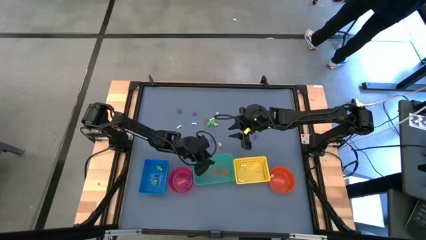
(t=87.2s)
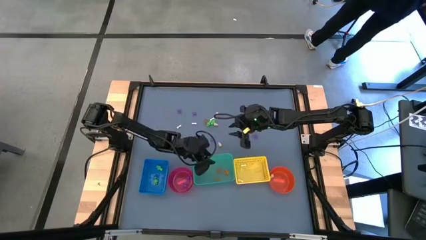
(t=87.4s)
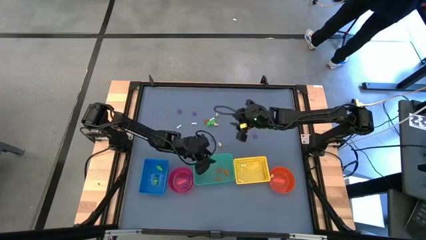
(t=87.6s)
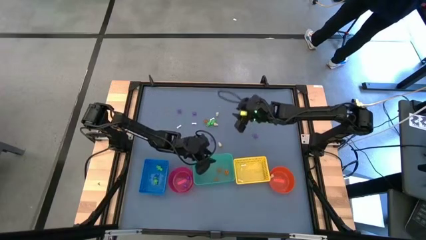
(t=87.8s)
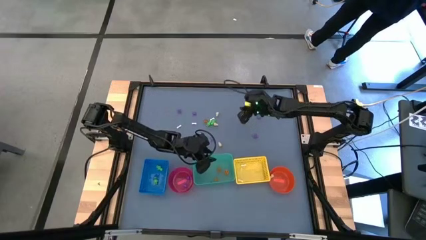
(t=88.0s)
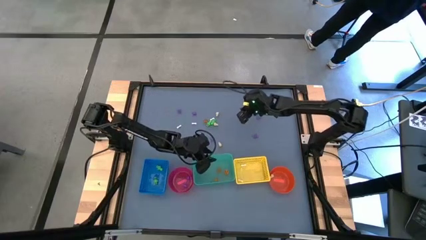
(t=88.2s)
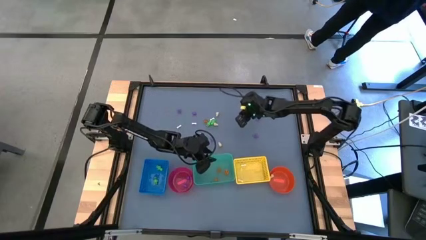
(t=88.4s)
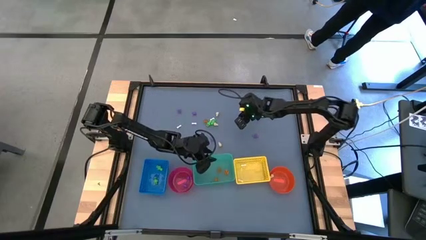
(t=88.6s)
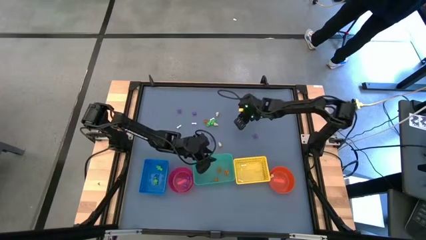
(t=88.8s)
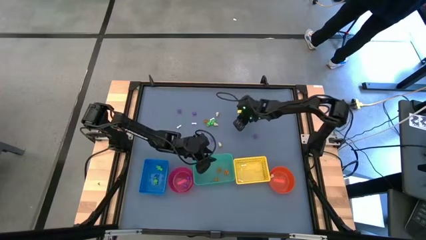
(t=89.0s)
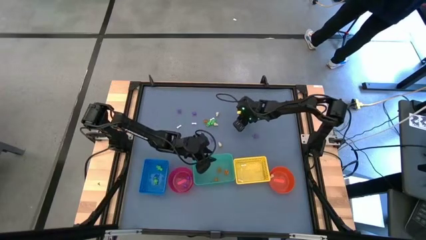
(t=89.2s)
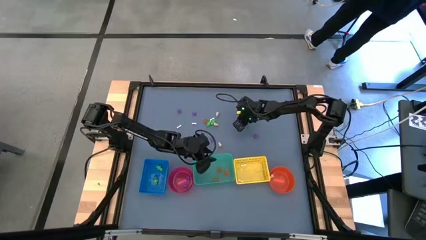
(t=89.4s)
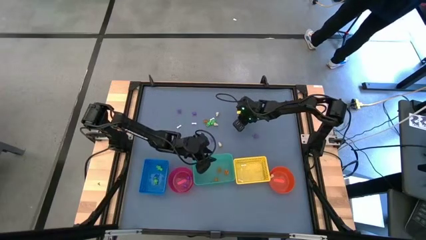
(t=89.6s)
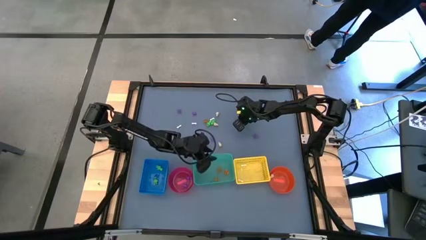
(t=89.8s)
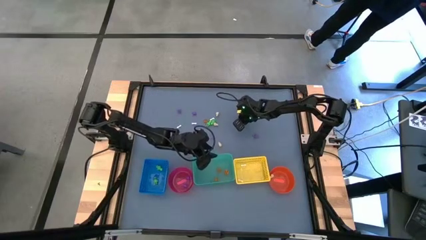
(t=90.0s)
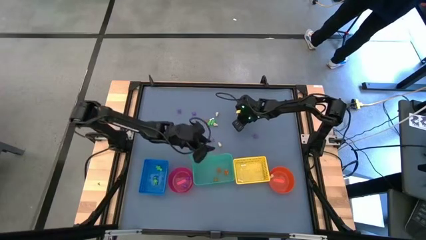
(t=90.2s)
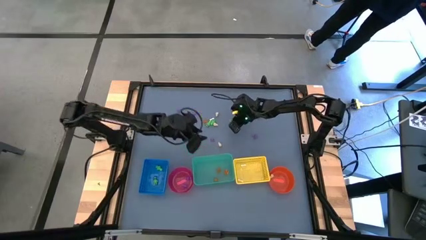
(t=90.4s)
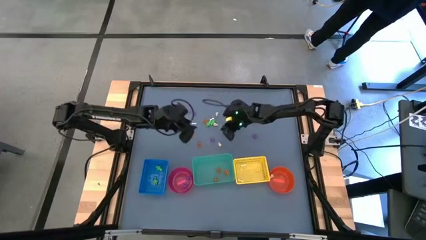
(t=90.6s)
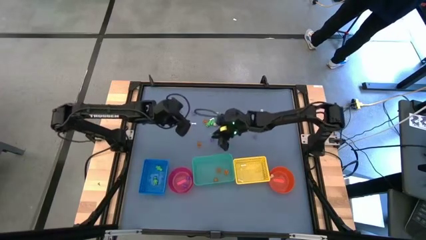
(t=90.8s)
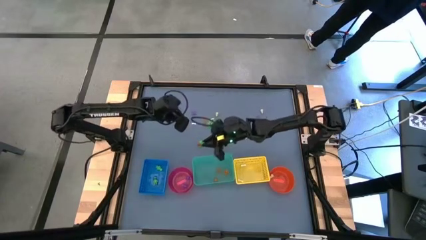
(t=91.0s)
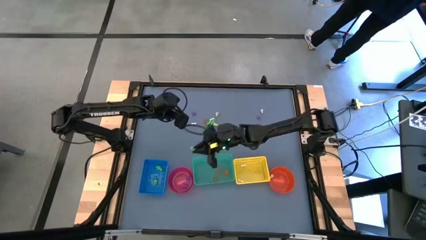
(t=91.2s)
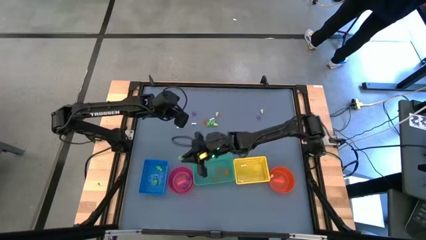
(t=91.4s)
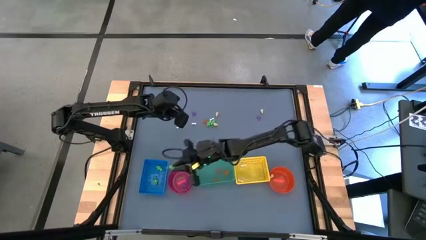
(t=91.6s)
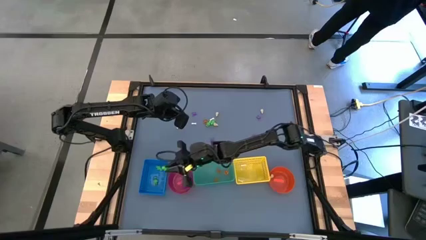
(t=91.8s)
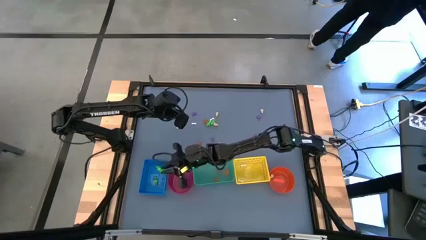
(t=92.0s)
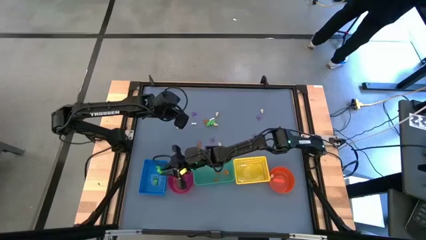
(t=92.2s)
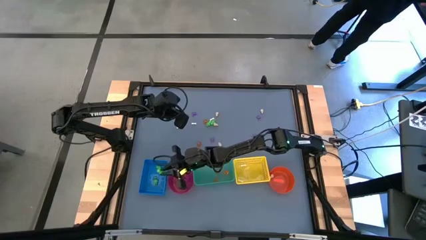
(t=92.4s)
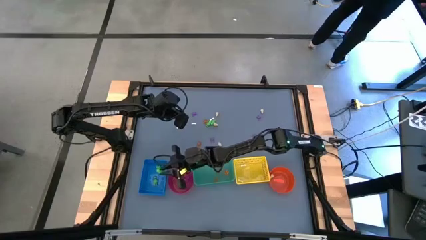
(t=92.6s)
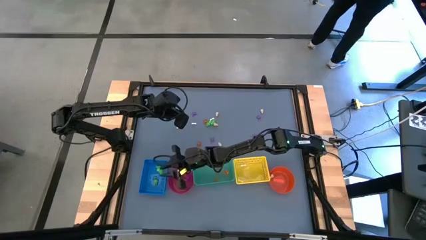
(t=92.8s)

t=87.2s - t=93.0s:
Task: Sort Halloween decoration
Put the green skeleton toy into the blue bin

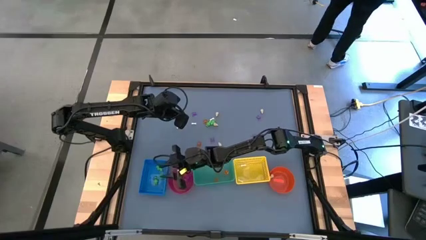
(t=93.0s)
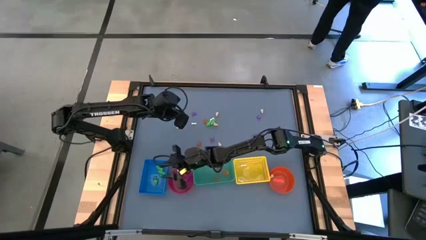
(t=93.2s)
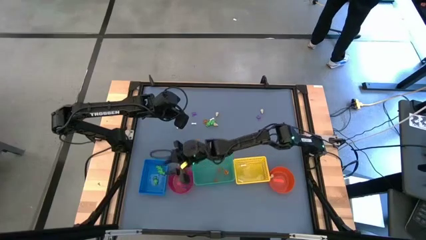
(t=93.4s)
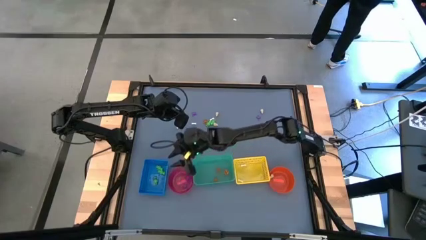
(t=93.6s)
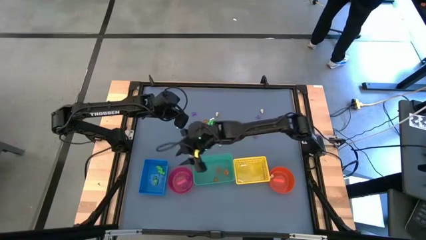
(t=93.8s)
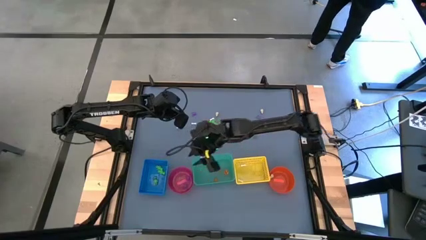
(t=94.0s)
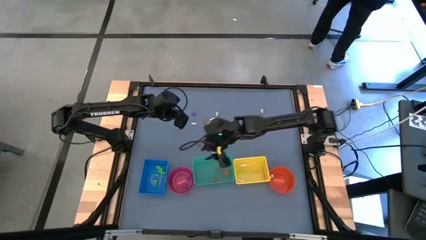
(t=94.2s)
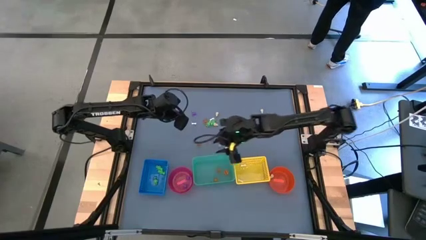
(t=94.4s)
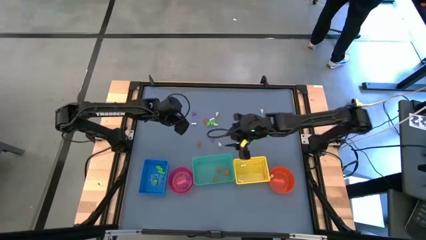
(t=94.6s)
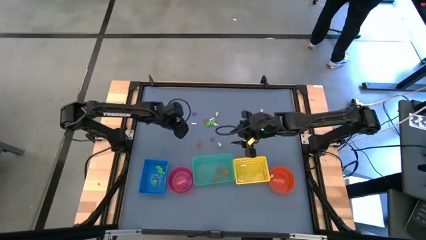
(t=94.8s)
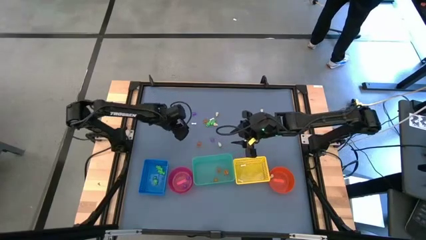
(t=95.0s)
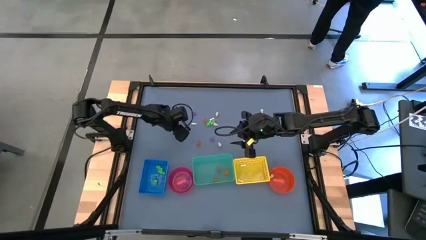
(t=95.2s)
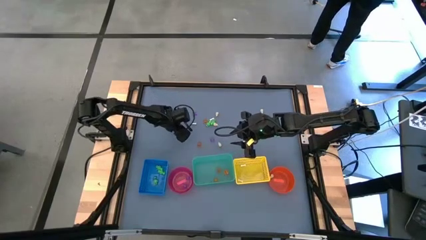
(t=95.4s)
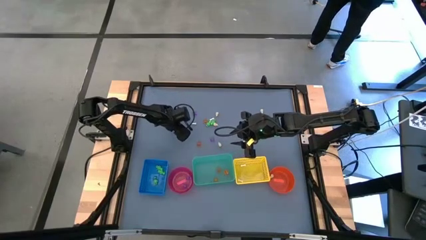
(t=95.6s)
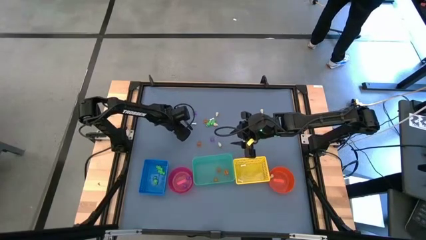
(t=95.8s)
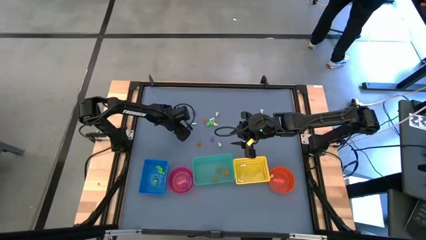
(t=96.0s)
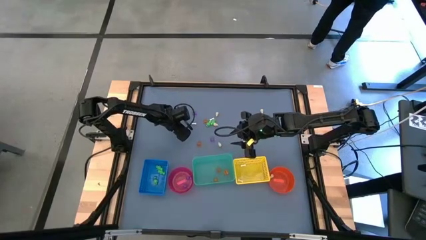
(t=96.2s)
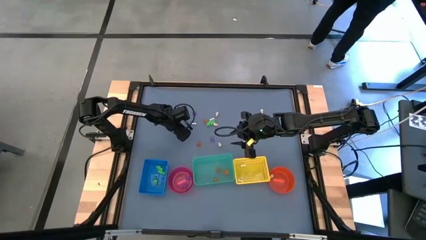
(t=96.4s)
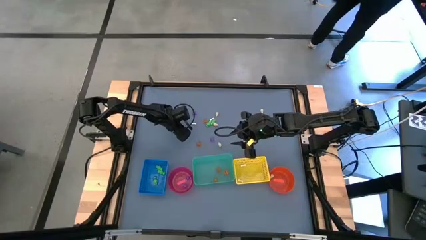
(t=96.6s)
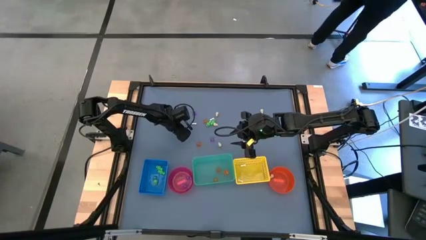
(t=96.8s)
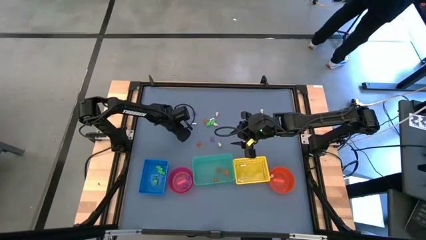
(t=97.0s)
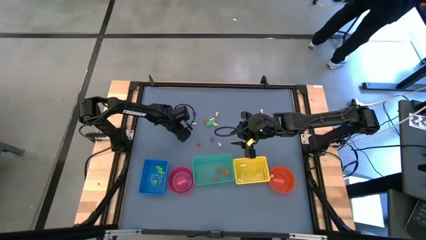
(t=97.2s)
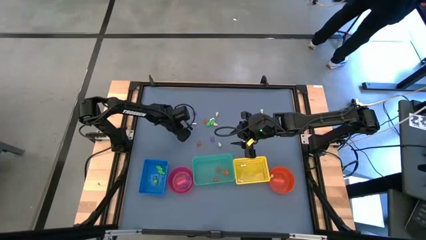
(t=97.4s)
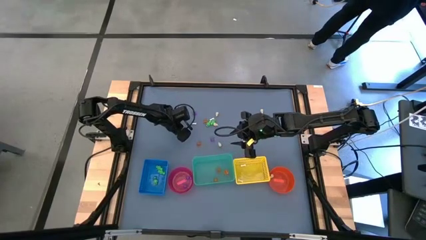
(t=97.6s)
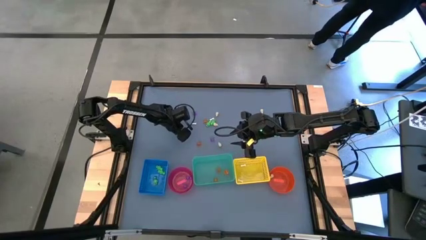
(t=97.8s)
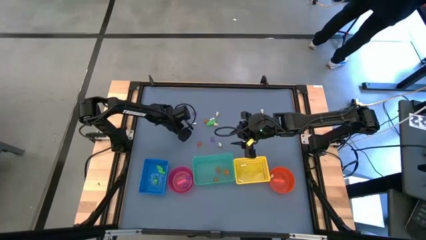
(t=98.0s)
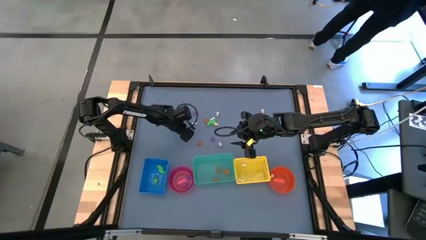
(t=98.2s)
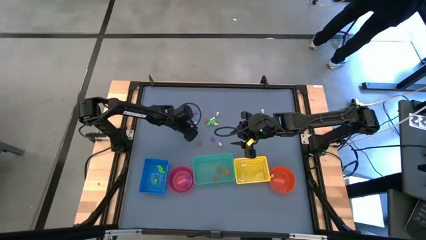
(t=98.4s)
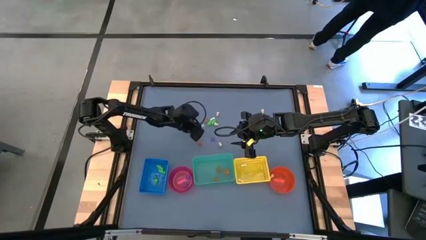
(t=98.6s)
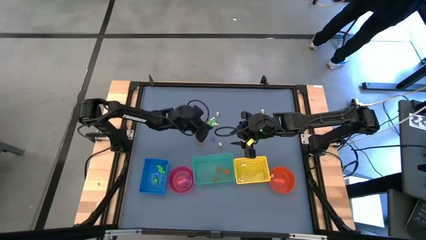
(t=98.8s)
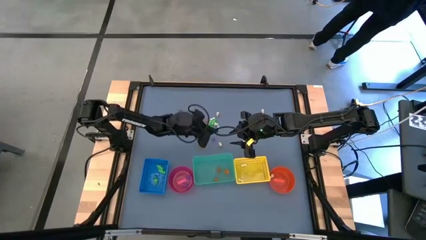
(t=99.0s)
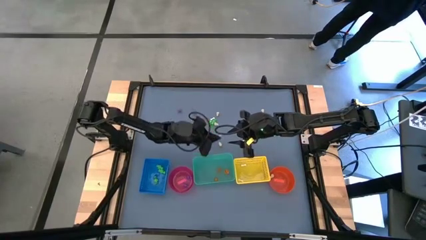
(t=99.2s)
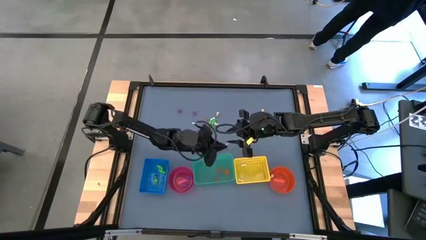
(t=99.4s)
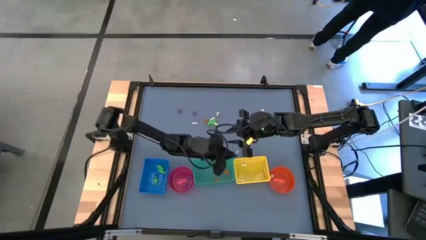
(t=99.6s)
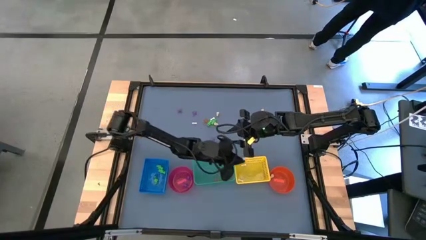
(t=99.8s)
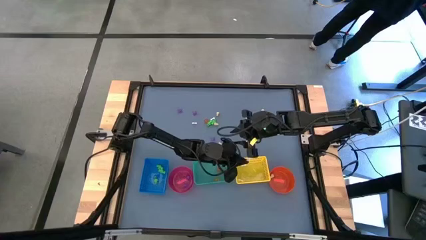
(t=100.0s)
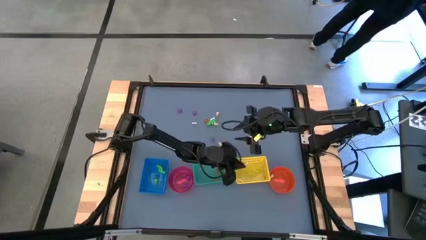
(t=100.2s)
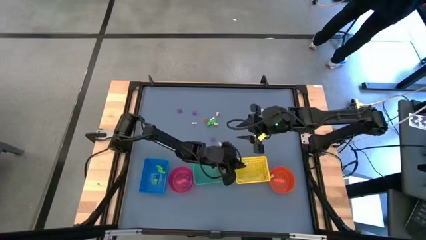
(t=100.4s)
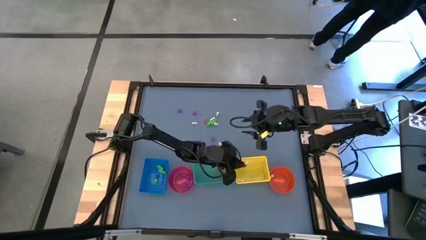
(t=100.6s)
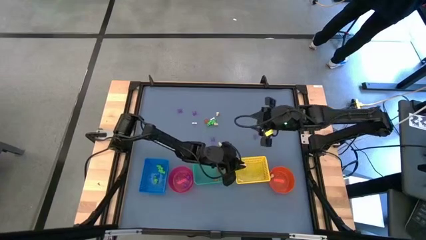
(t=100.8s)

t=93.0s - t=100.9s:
Put the white bone toy into the yellow bin

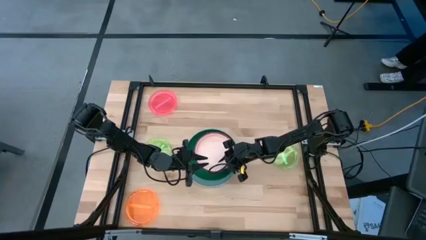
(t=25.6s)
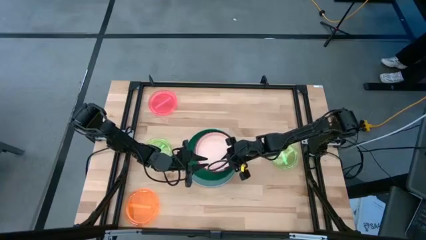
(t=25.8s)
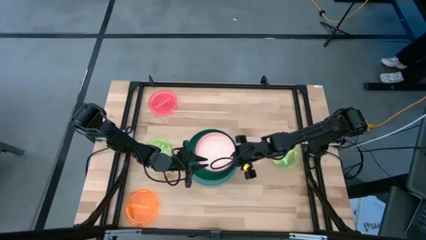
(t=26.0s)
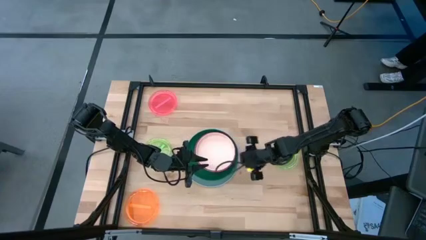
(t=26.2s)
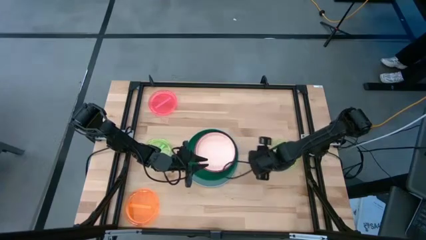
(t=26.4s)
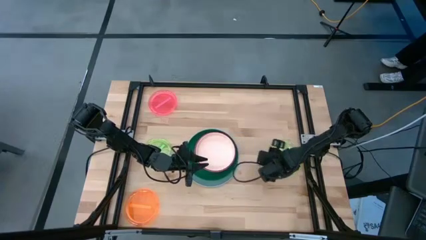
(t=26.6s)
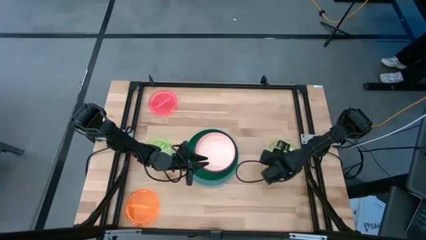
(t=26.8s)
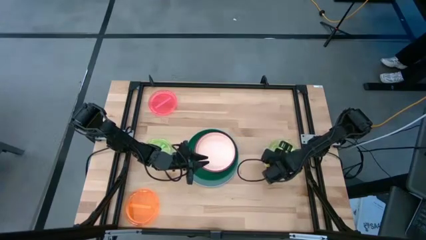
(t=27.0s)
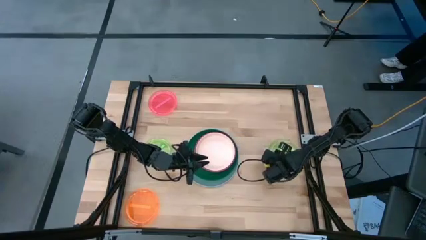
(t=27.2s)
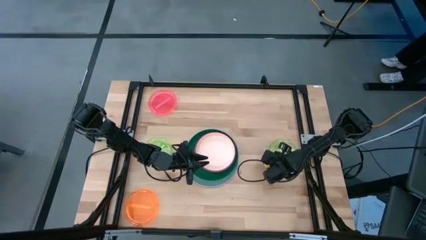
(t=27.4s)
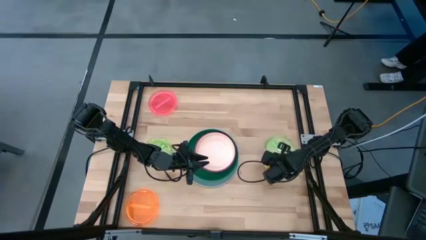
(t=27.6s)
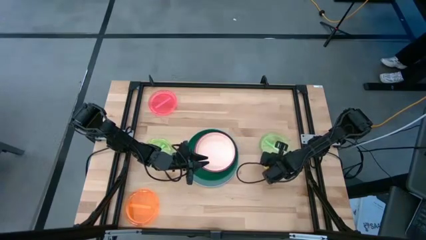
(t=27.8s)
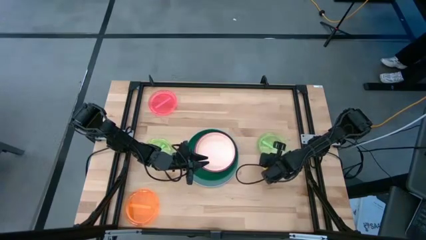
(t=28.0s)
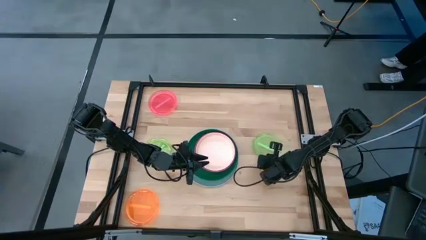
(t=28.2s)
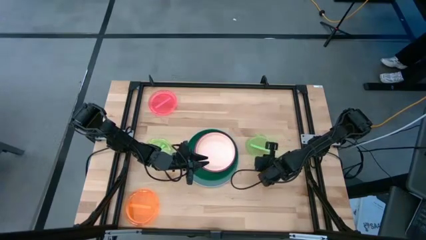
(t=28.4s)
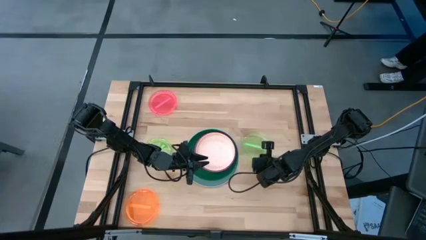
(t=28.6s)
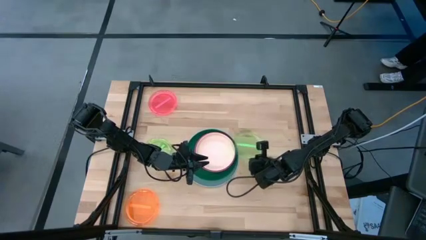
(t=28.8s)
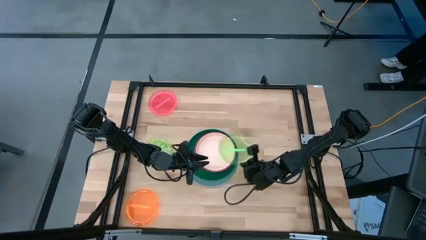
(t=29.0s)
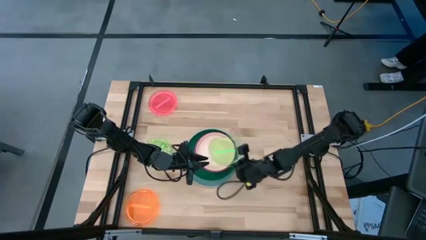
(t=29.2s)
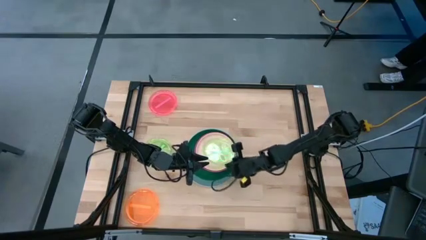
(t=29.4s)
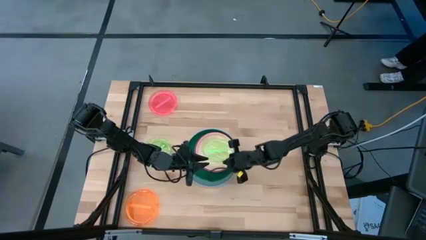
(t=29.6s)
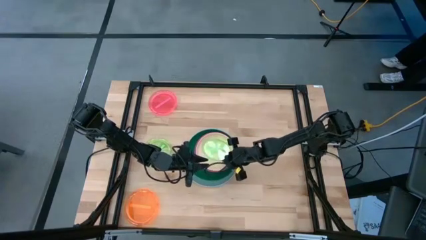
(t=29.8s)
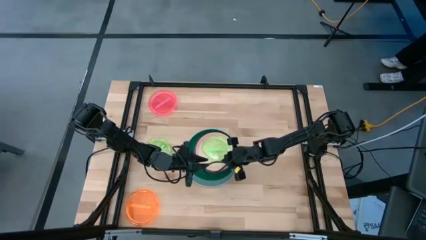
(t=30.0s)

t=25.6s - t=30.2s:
Task: Stack plastic plates
Stack the right transparent green plate on top of the light orange plate
